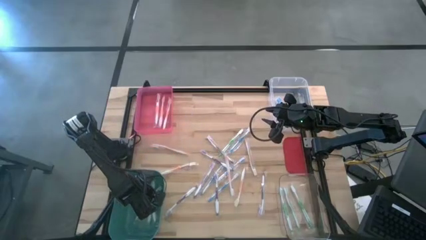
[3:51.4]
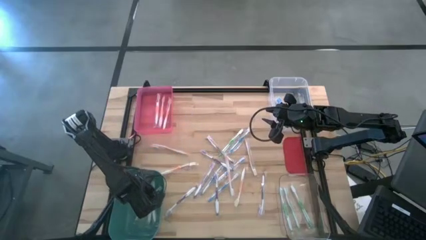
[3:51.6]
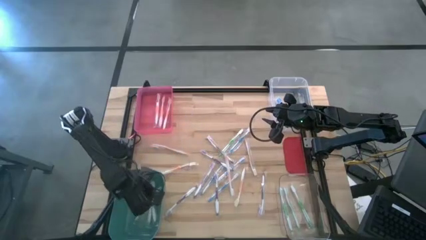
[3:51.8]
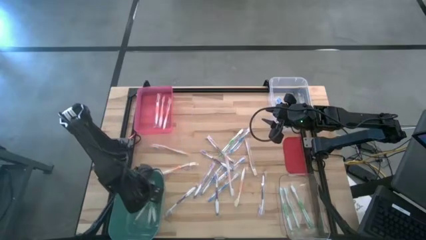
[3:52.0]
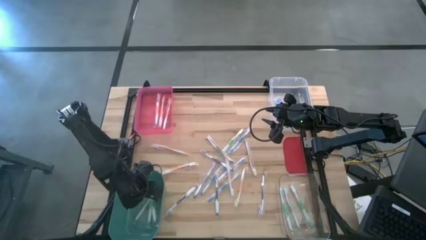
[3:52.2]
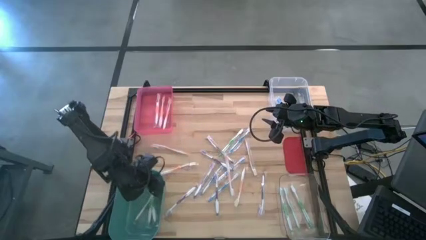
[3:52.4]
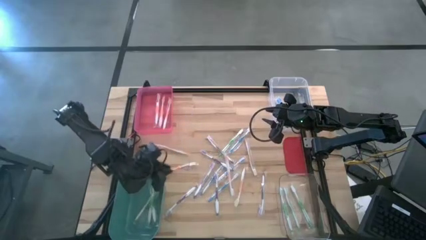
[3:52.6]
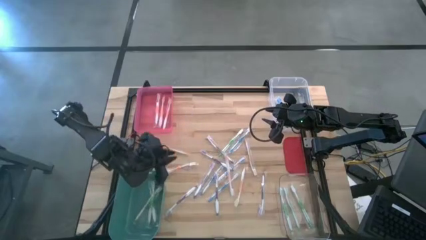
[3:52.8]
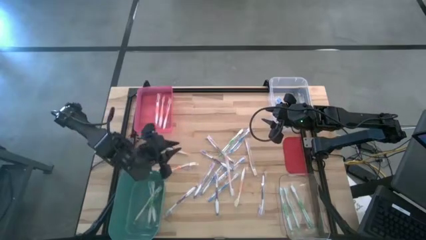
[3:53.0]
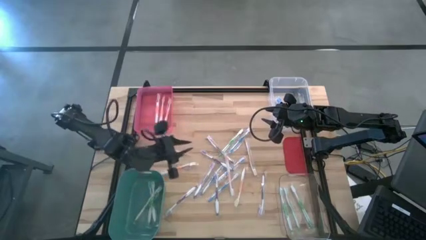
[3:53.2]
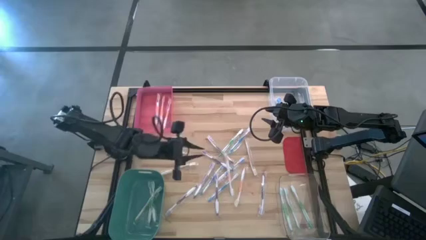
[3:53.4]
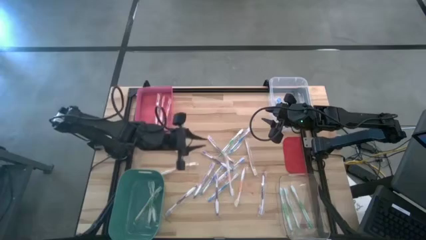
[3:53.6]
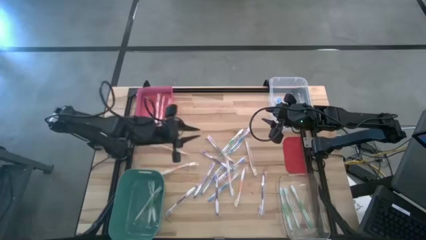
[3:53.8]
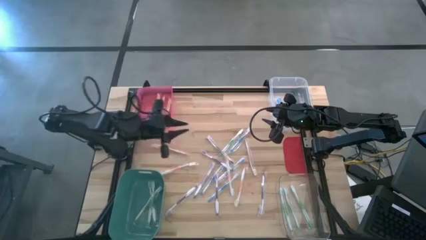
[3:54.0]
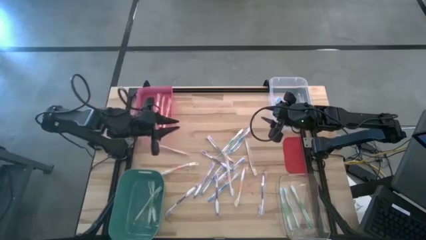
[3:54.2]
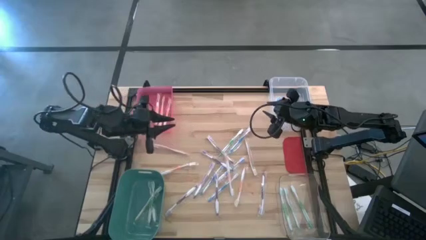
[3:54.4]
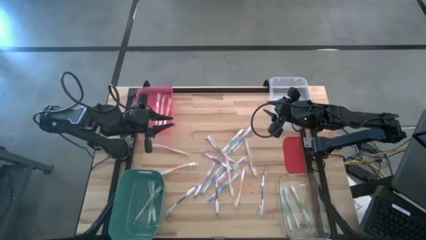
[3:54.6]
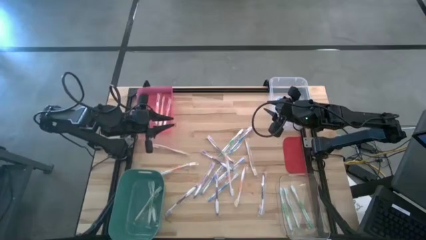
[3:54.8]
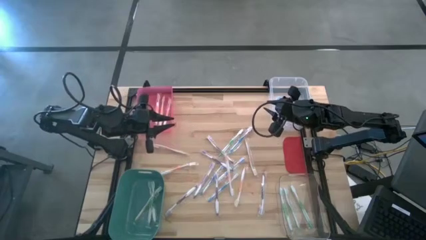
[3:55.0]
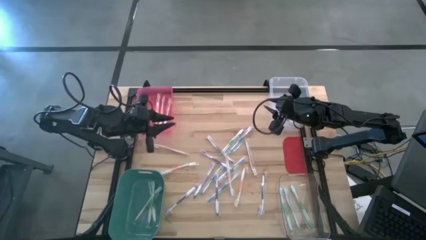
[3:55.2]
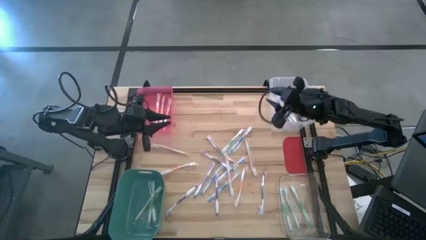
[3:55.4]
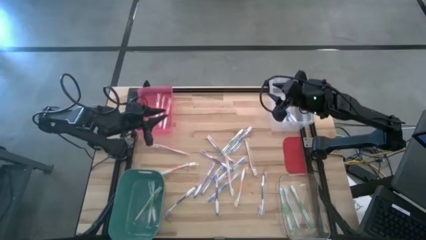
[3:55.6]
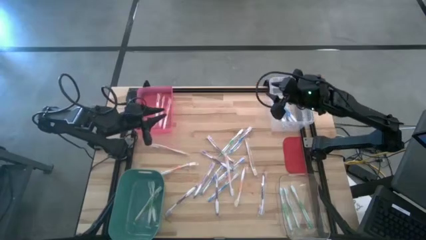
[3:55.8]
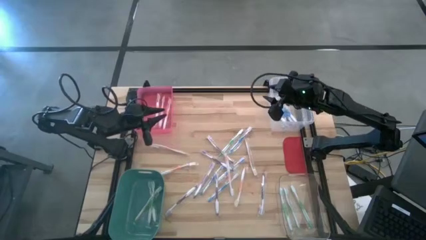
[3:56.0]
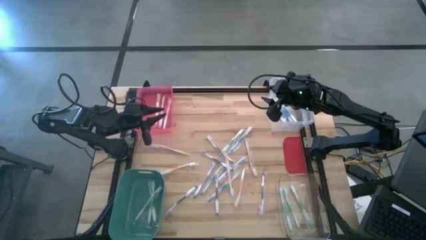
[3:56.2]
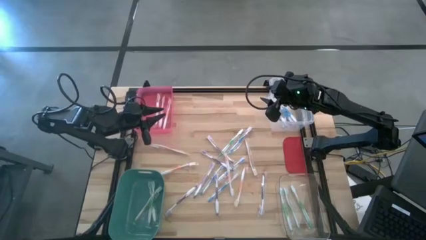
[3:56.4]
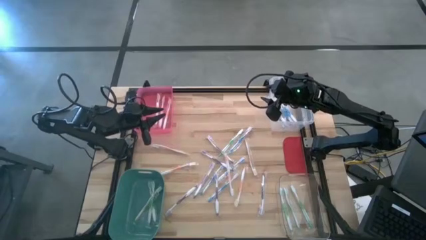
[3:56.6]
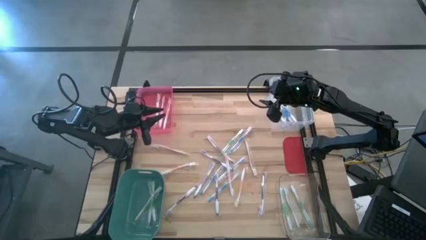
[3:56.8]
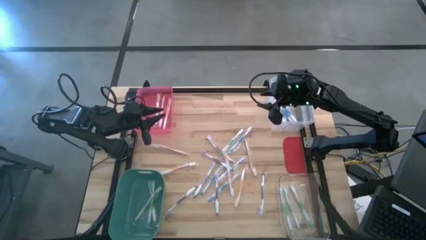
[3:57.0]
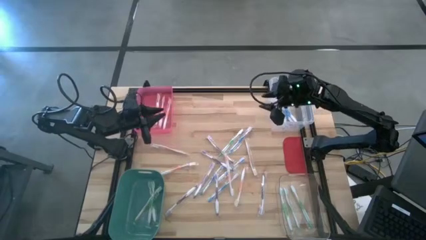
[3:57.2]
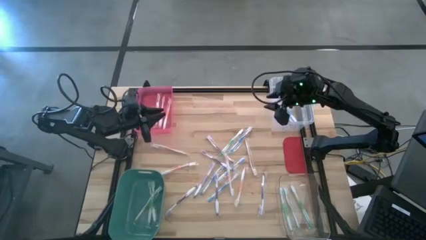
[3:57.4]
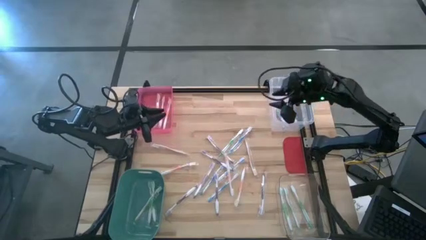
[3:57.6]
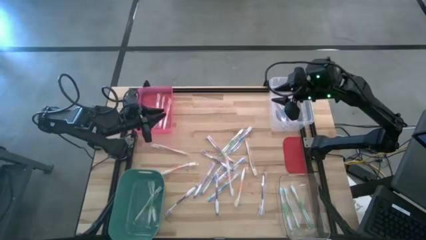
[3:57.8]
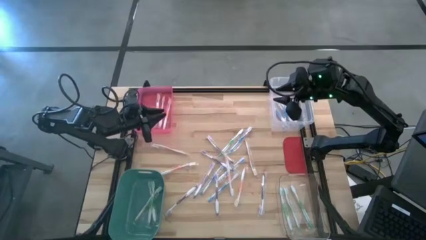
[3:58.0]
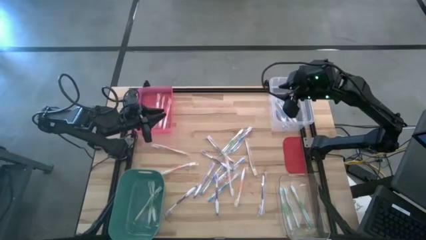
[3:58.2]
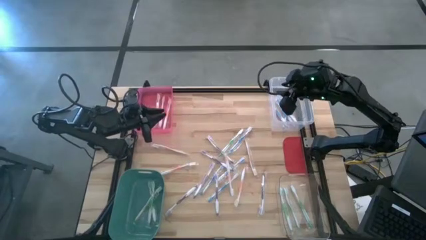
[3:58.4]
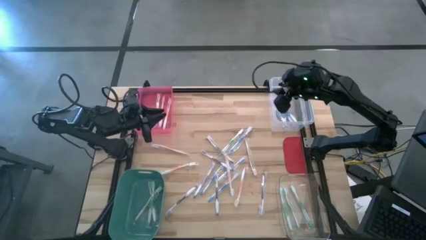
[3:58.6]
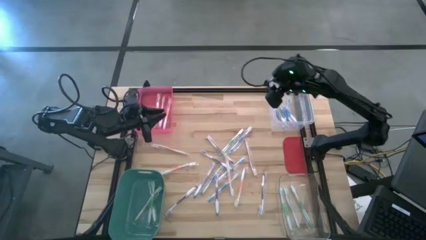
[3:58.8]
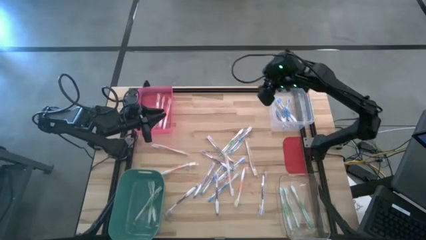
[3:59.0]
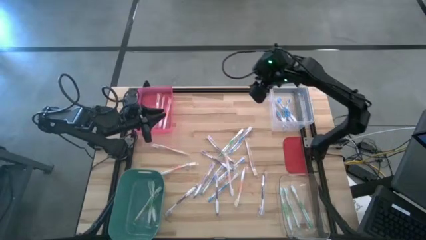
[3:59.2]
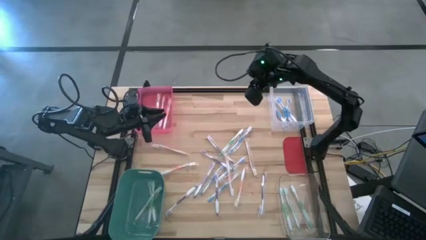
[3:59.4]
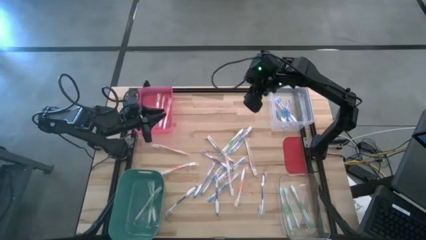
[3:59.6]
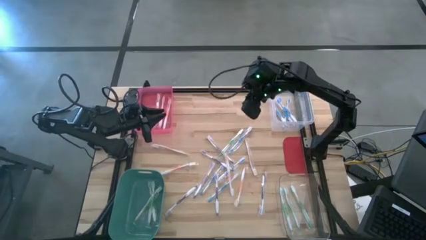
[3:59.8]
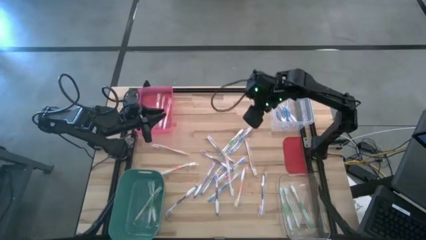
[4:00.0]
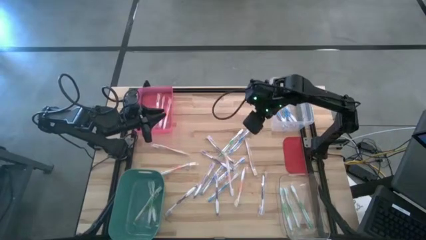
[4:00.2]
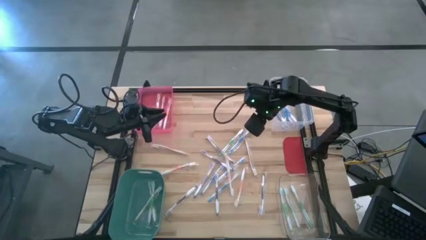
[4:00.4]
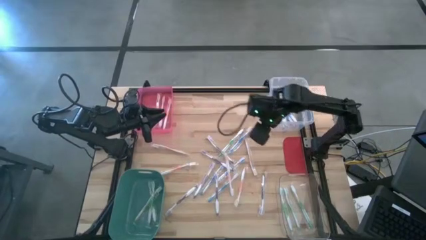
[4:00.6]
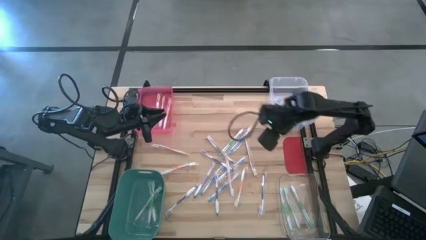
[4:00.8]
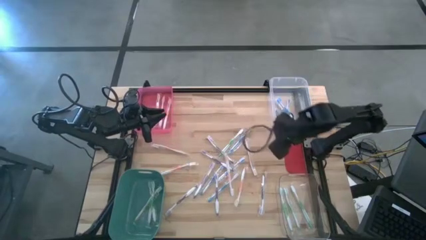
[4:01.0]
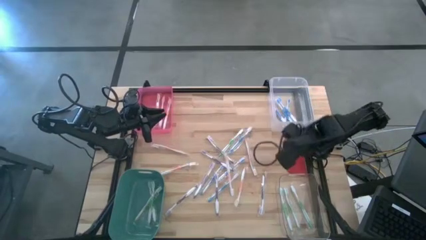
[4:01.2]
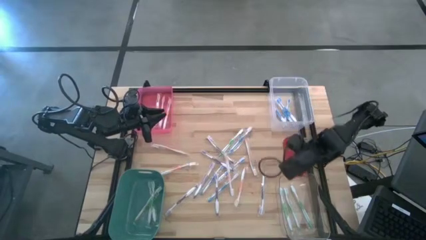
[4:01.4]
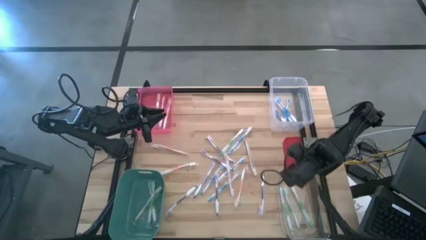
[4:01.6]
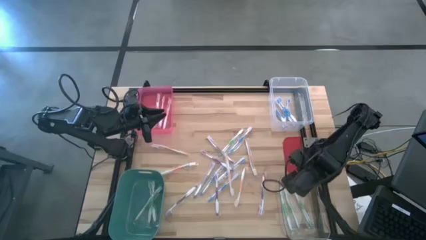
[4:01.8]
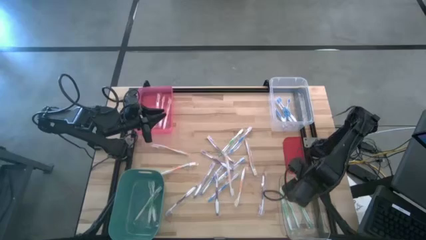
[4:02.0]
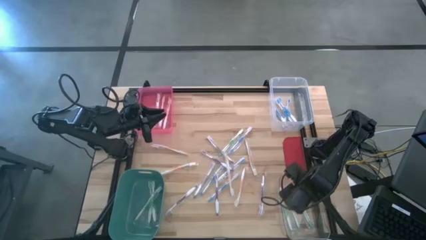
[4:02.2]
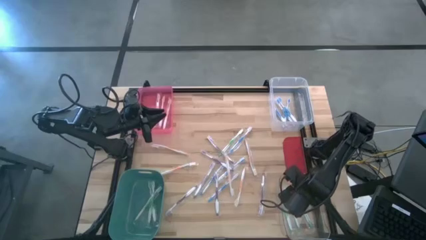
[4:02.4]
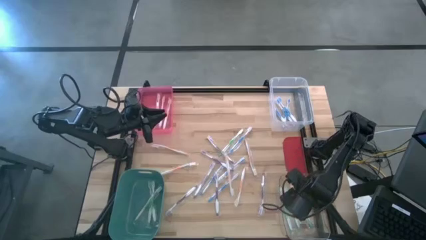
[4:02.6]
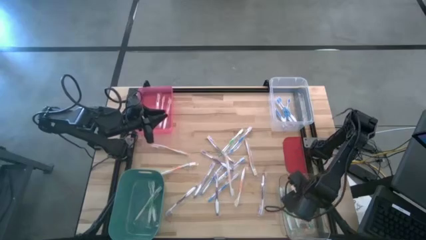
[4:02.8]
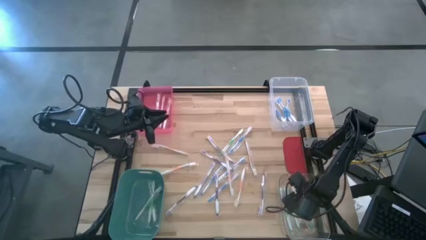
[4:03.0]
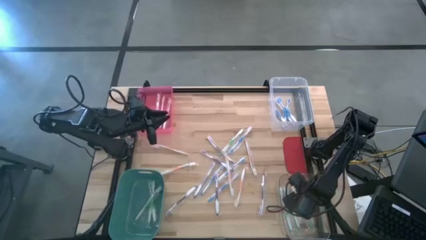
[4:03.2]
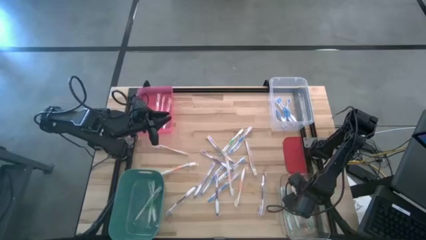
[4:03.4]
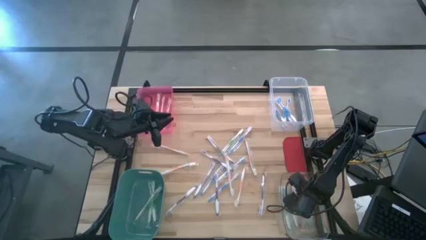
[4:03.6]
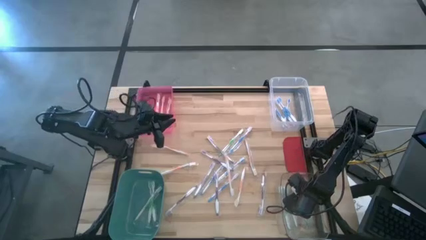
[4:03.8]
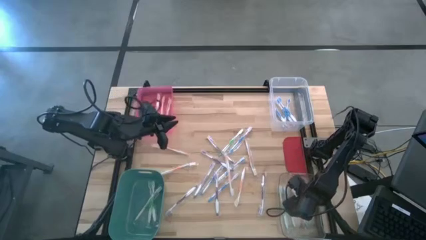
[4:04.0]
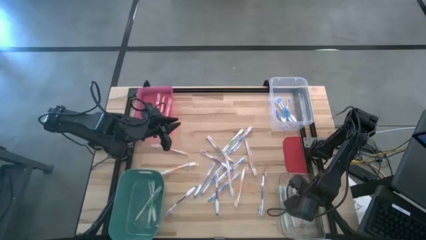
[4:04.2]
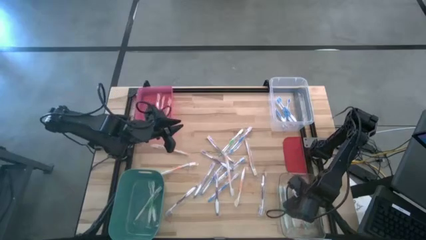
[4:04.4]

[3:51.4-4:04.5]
Task: Pick & Place Toothbrushes
Put the green toothbrush into the green bin
